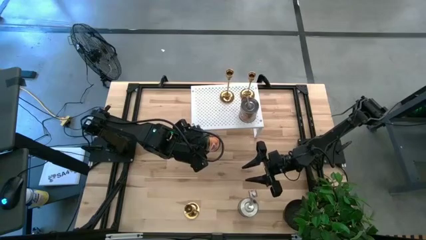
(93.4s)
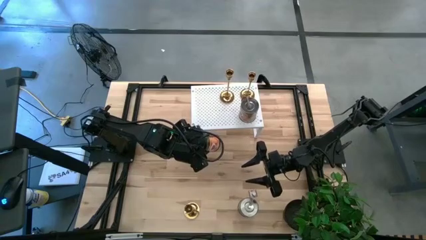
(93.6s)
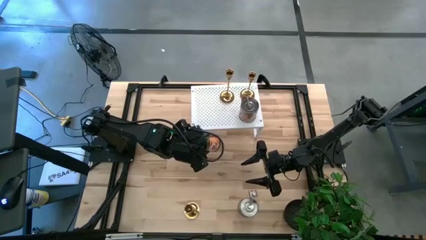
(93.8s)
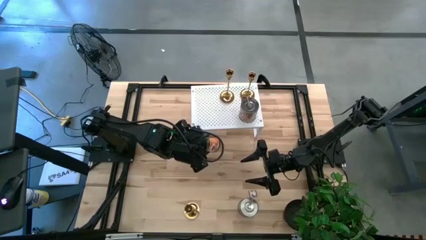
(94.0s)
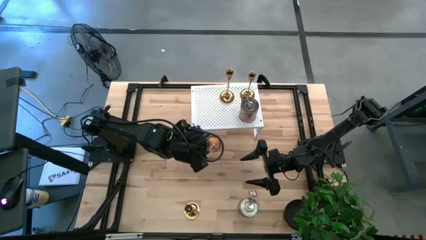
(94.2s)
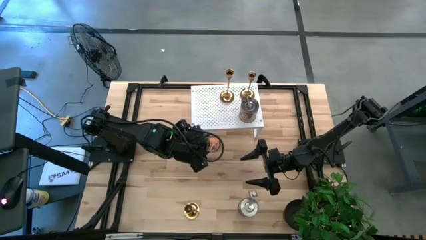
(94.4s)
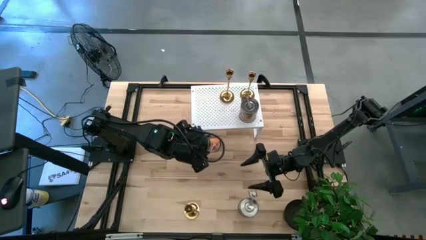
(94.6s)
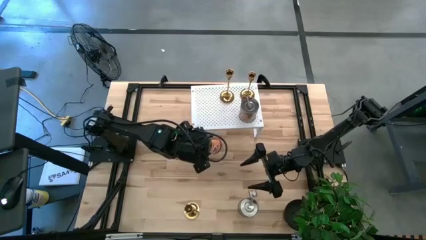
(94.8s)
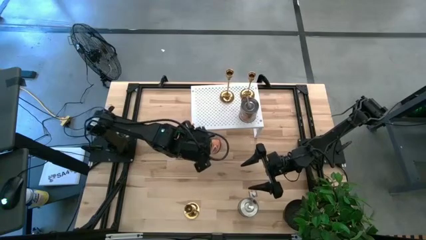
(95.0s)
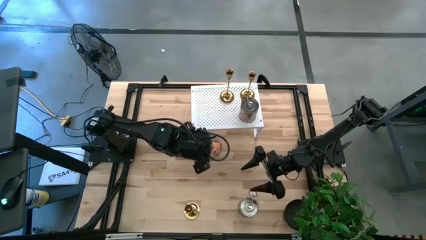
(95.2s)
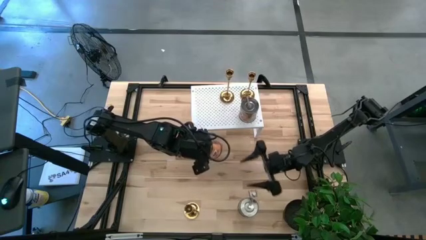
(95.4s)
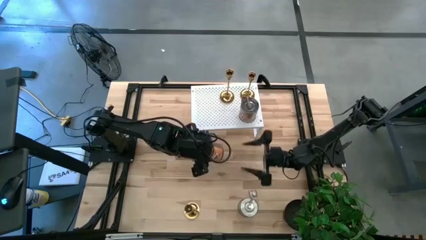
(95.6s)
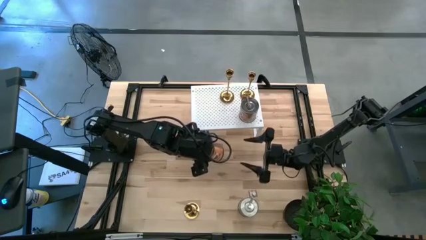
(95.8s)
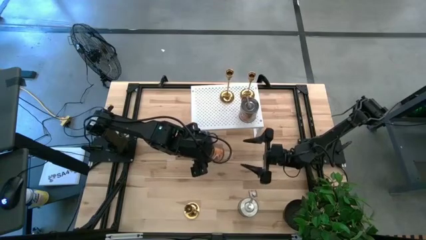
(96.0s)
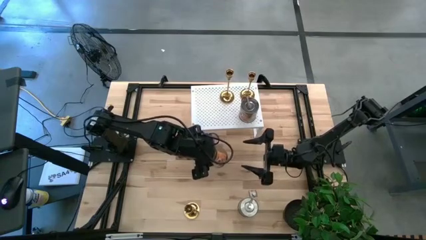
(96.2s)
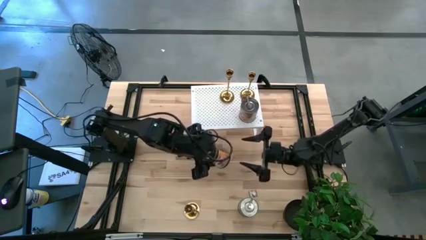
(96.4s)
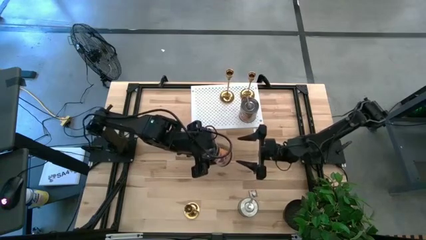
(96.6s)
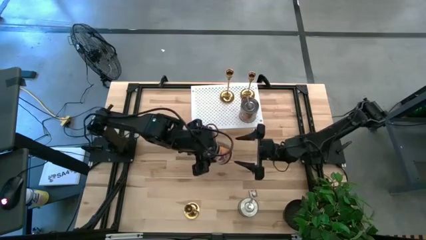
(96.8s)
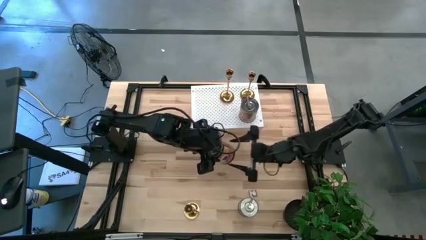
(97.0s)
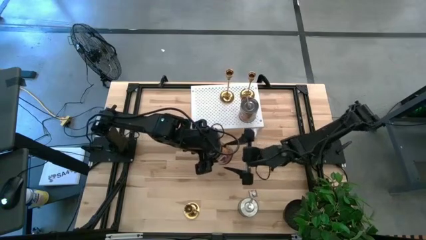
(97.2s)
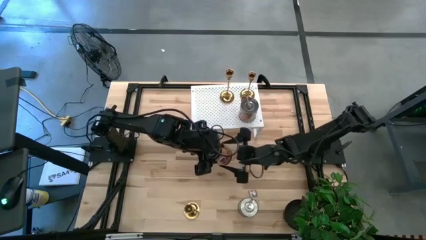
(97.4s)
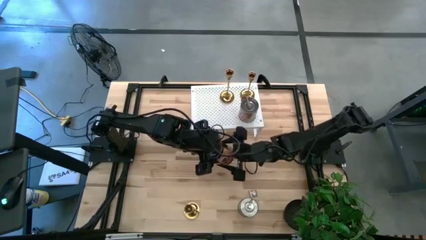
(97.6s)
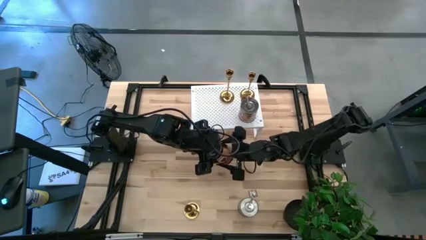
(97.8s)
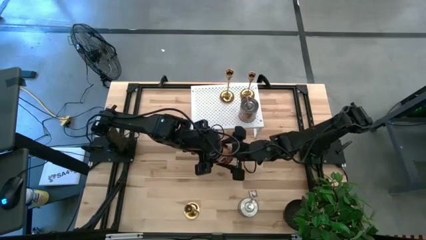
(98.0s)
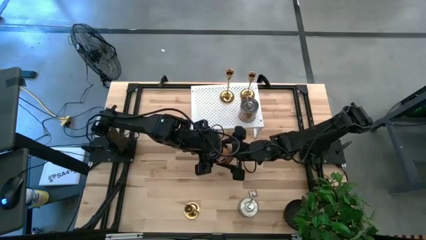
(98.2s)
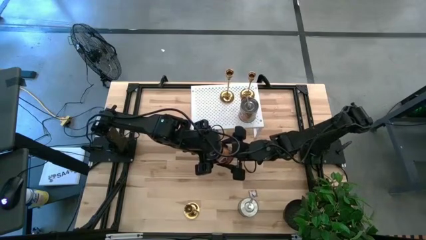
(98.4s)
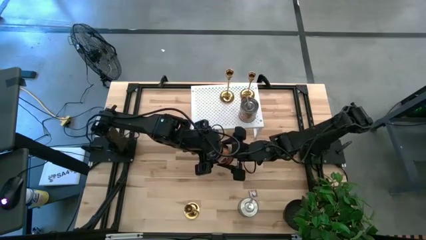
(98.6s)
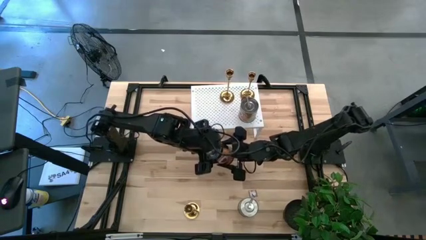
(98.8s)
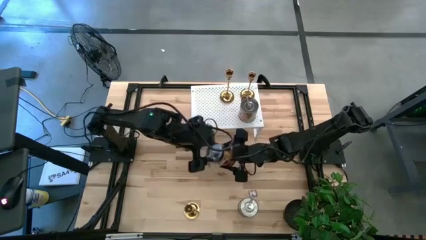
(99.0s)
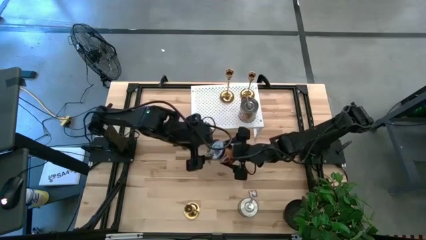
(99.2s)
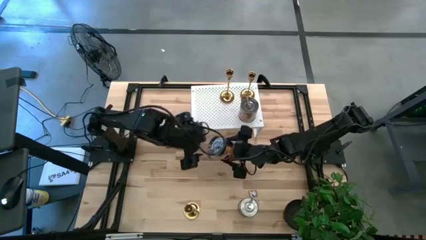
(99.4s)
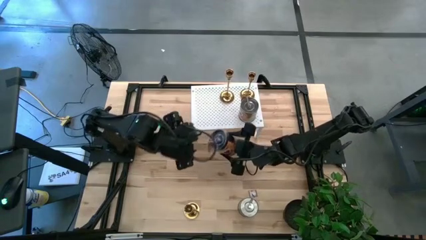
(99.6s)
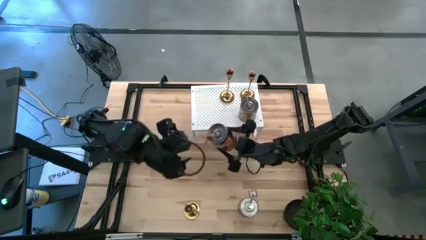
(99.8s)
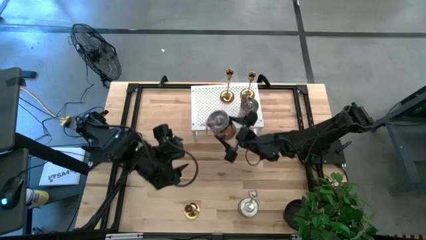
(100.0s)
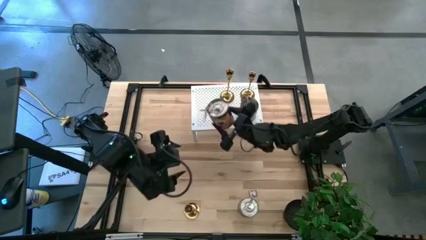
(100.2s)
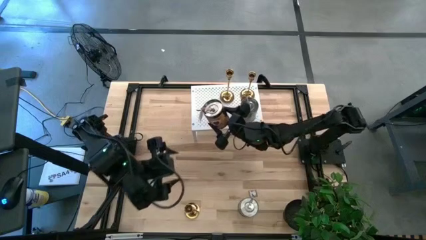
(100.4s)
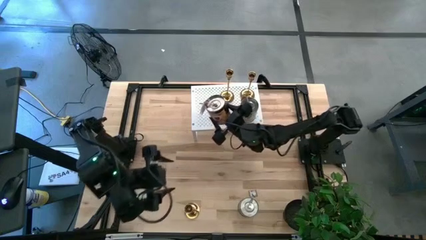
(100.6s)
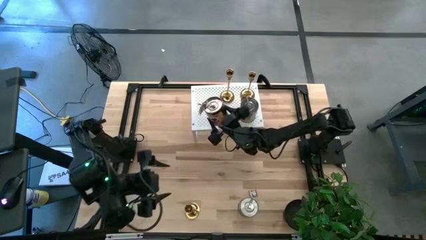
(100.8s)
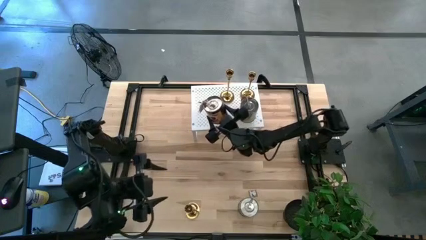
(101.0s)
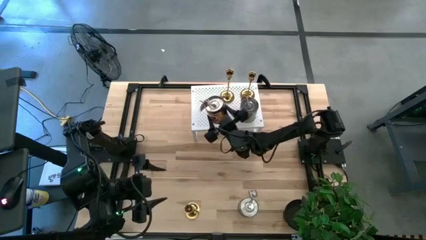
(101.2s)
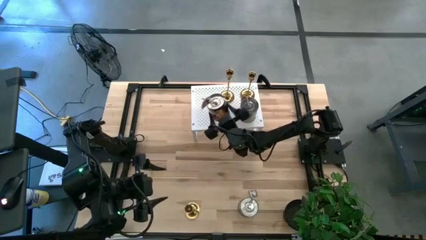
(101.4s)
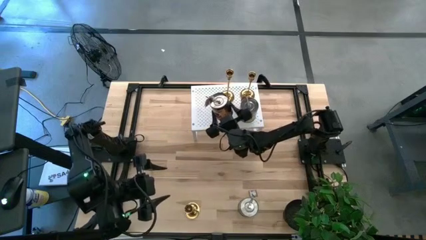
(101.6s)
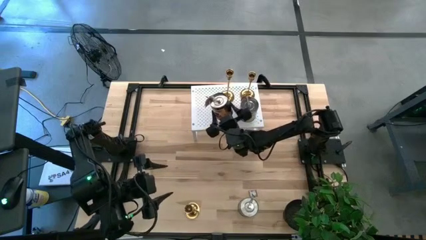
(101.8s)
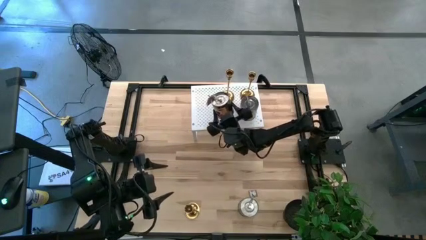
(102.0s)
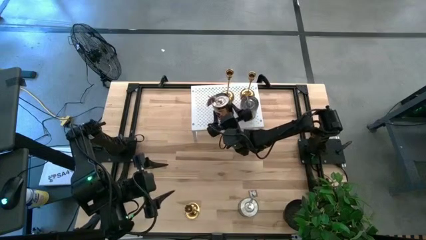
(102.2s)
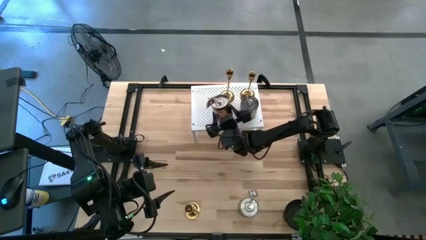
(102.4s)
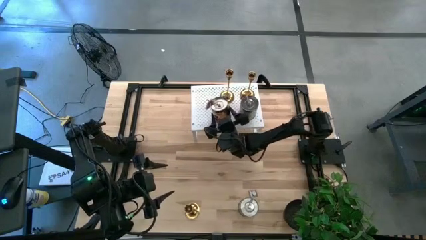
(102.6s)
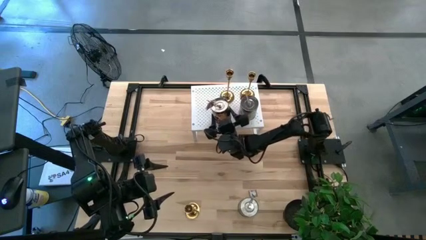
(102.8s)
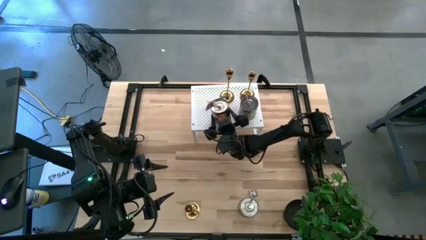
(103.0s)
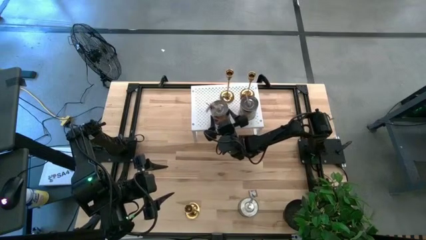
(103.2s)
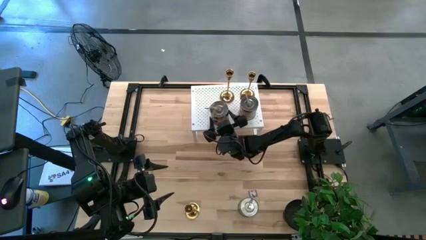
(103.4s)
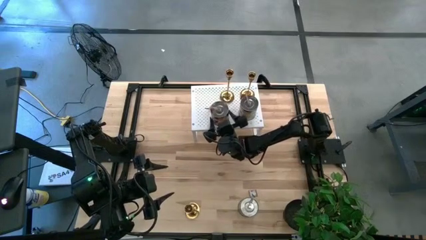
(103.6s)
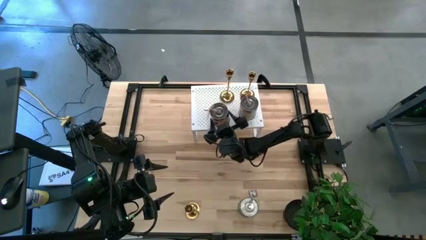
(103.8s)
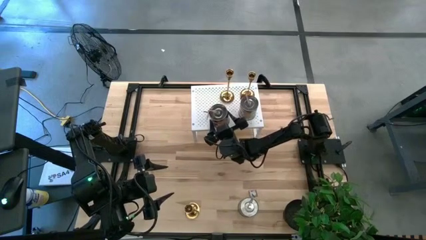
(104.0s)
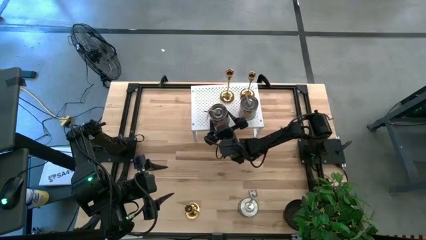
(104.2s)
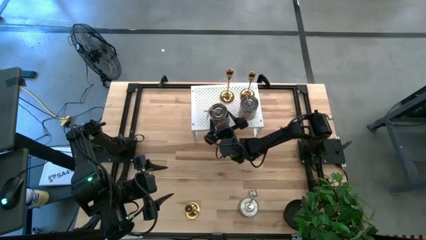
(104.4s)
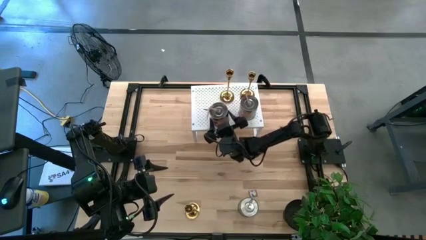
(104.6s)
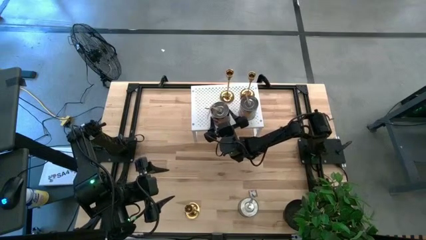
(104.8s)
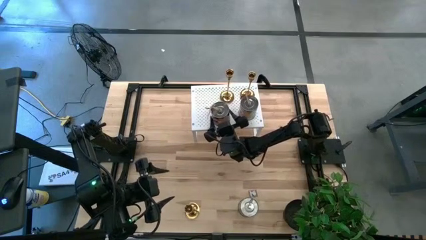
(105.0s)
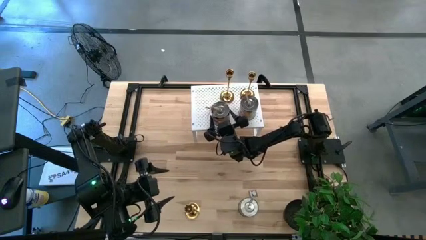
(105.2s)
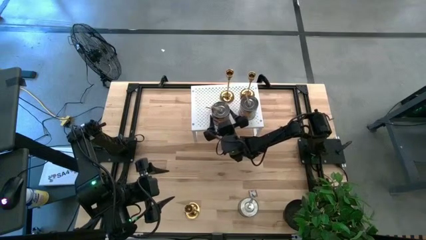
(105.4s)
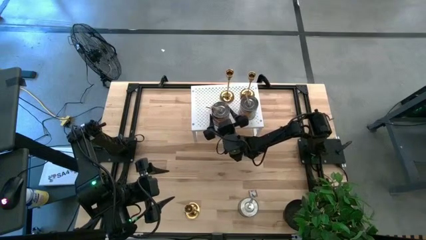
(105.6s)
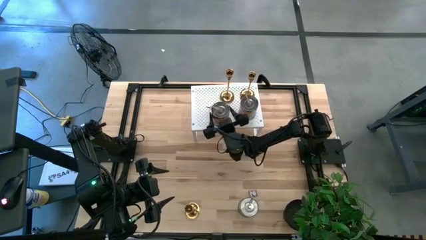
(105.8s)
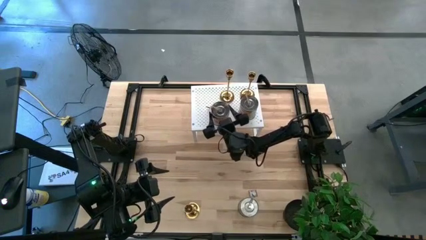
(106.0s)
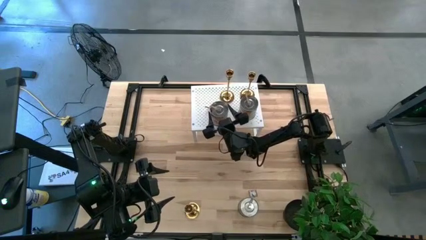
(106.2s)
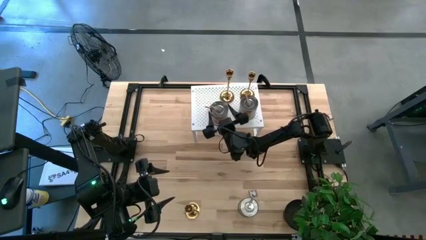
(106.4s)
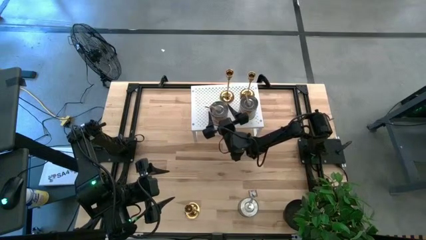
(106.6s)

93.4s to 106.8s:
Task: Pick & Place candle stick holders
Put the left silver candle on the shelf aligned with the other silver candle

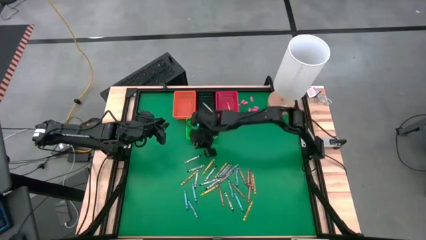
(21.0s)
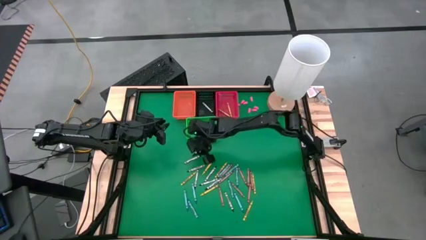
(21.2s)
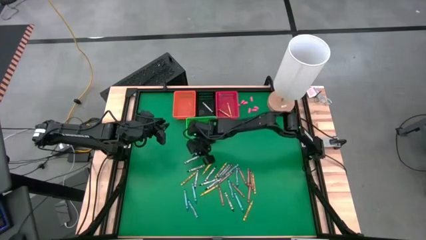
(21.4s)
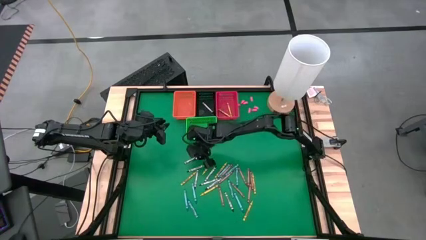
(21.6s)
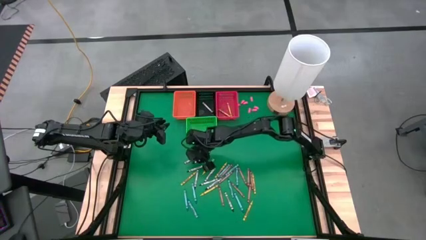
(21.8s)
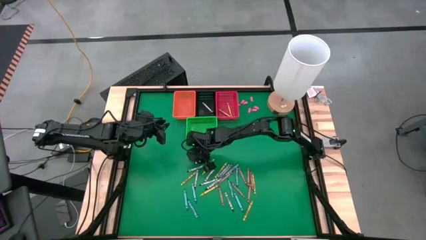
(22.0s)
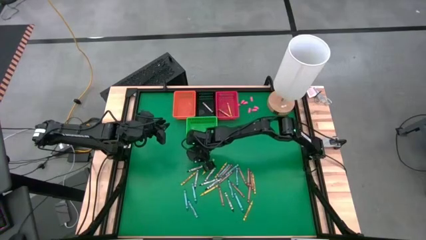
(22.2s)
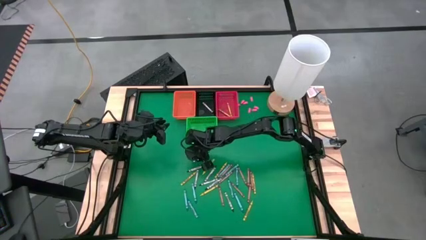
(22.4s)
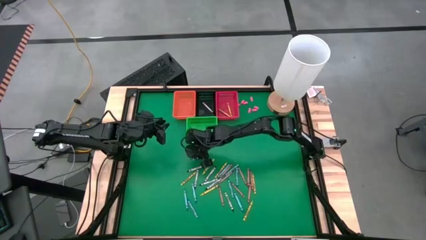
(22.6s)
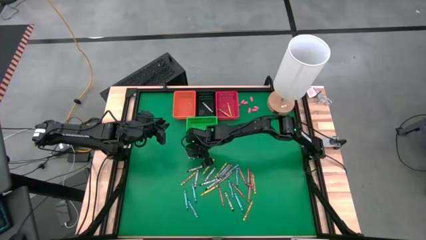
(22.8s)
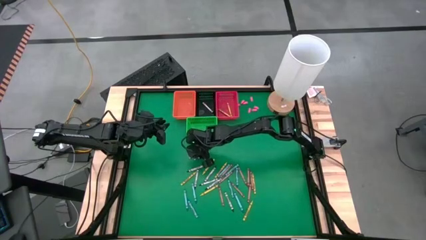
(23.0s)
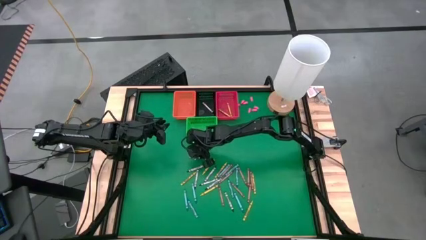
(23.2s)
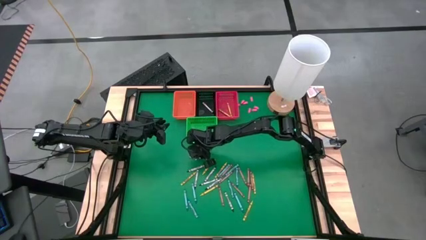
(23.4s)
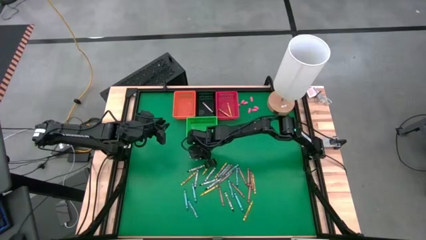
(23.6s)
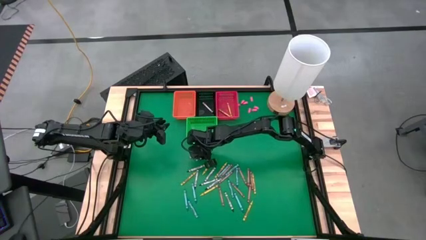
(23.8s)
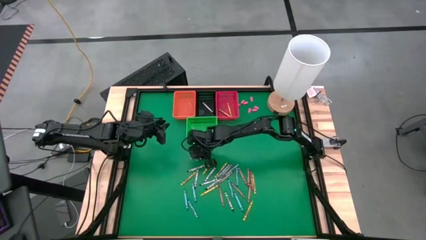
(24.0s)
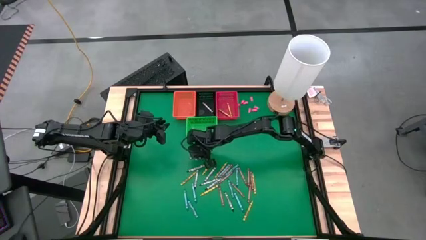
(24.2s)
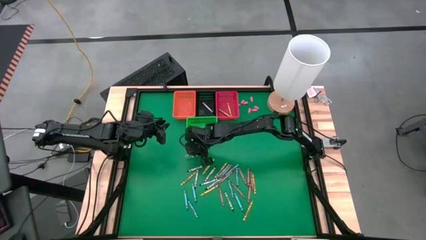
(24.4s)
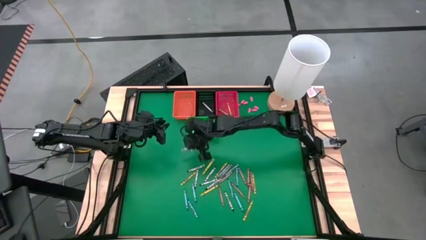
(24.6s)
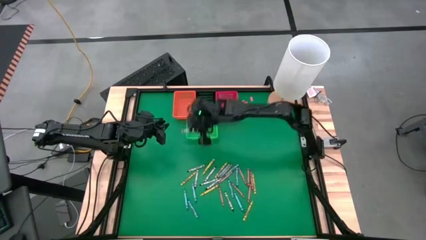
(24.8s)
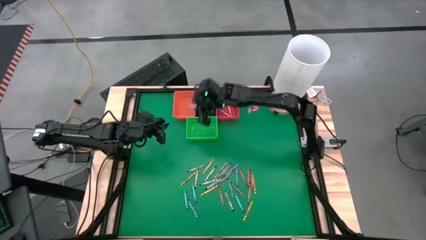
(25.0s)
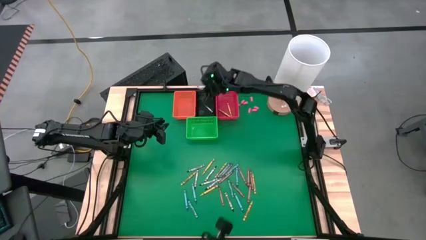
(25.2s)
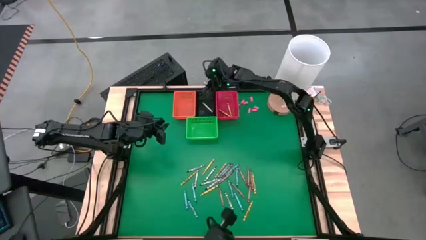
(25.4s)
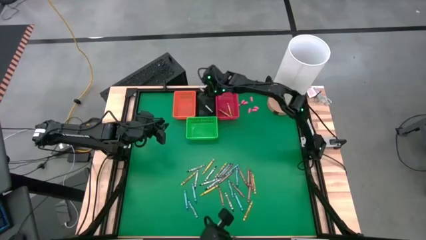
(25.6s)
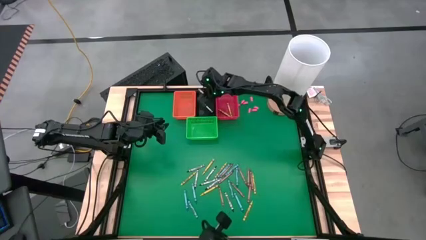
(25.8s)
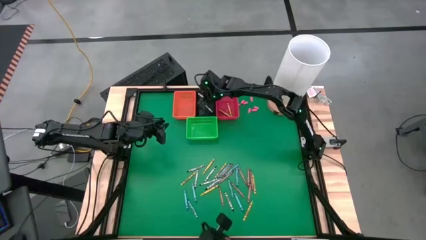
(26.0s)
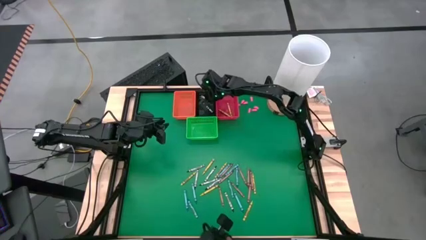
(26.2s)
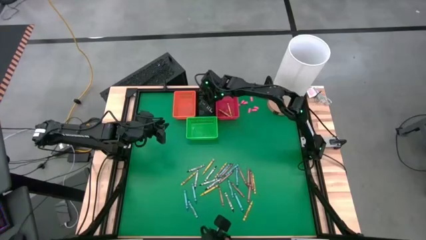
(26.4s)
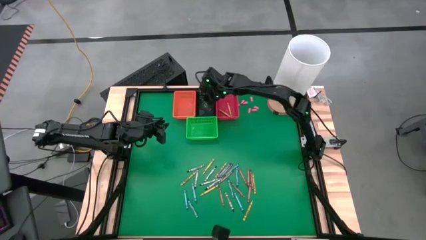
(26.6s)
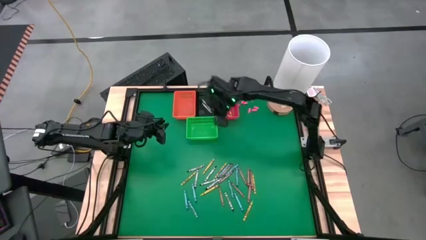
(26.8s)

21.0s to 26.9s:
Task: Sort crayons
Put a black crayon in the black basket
